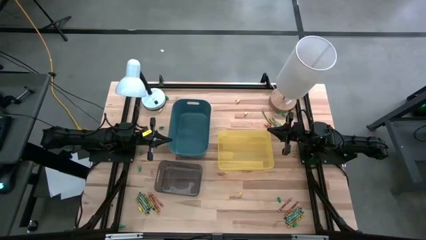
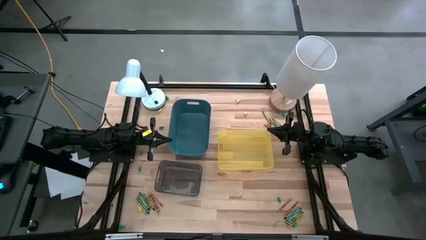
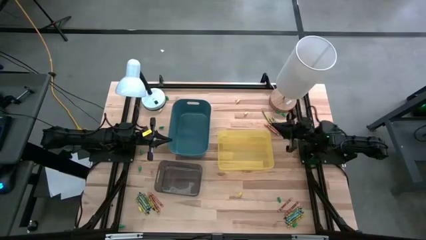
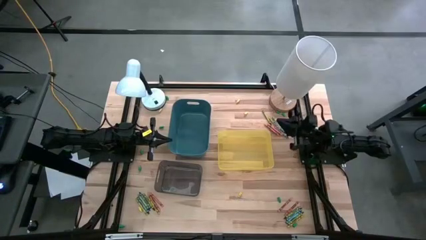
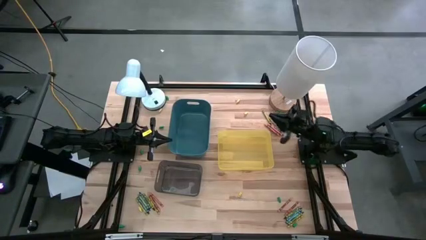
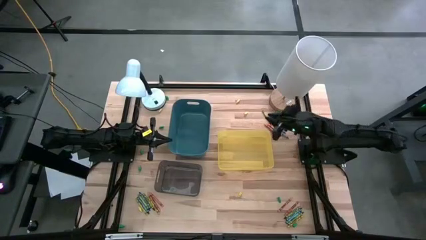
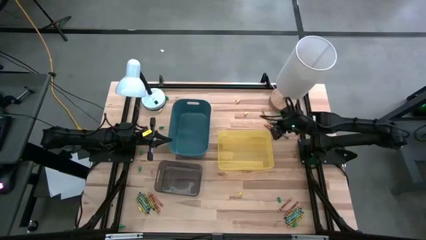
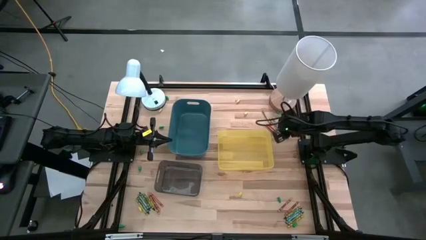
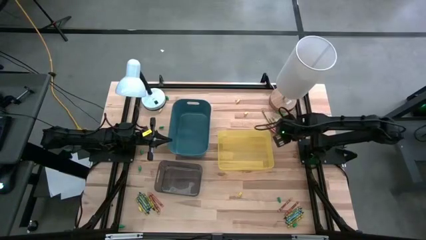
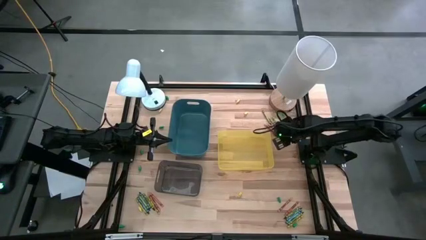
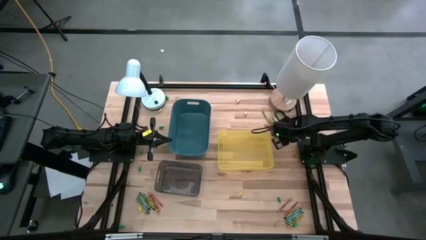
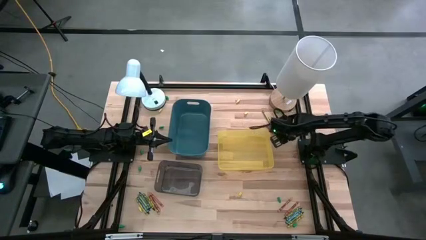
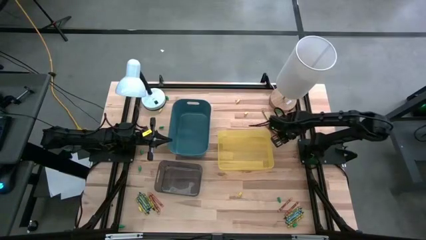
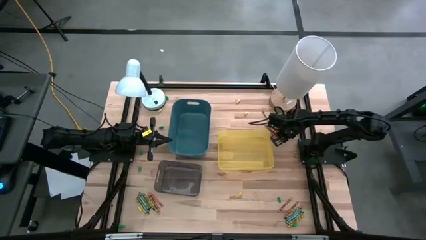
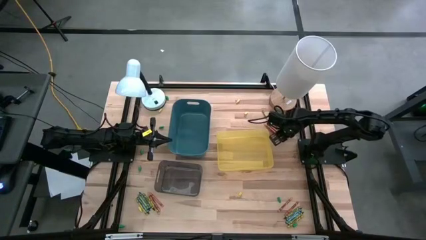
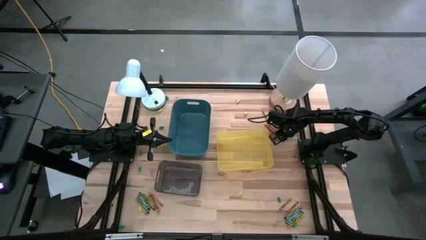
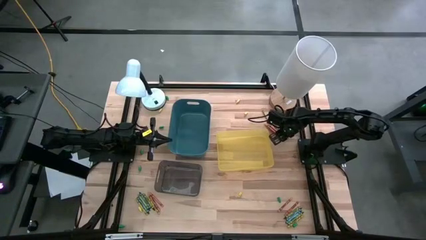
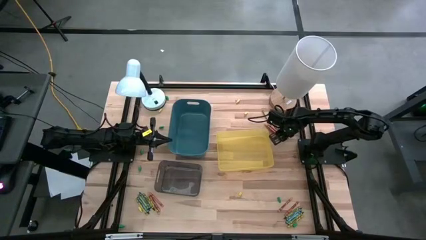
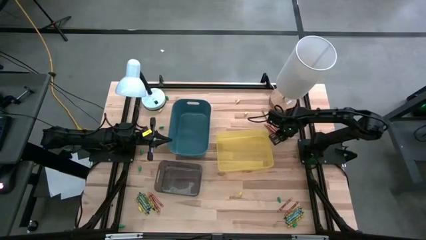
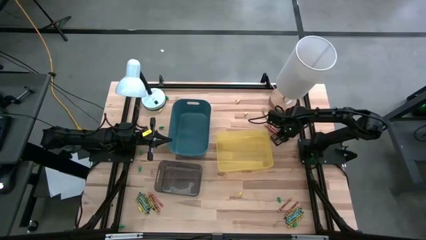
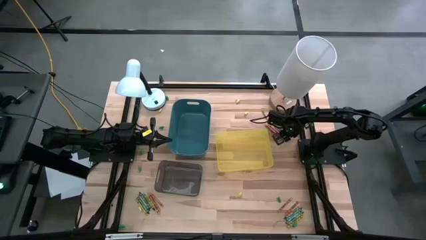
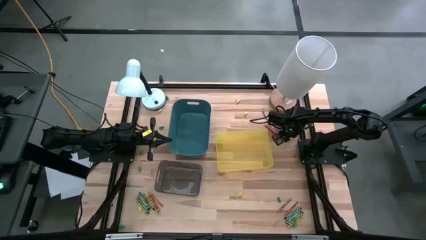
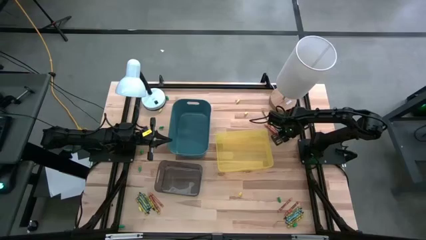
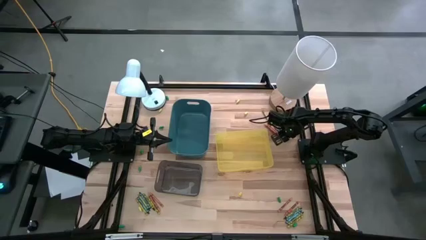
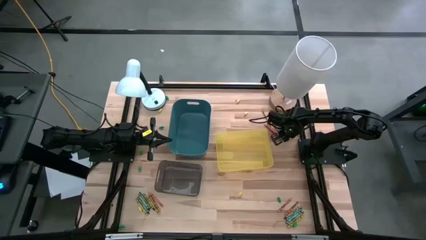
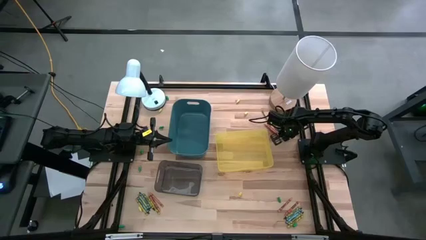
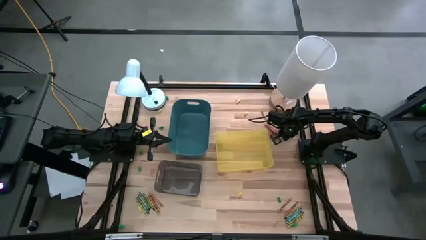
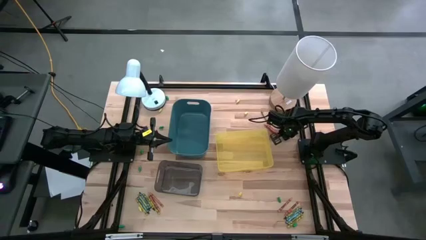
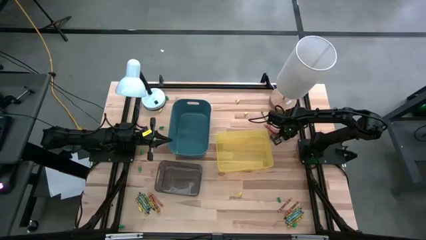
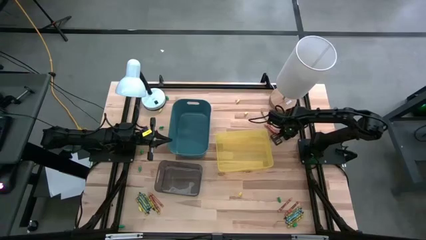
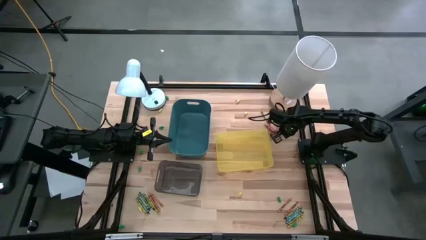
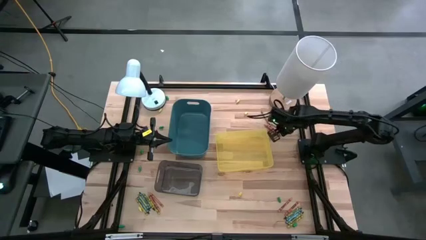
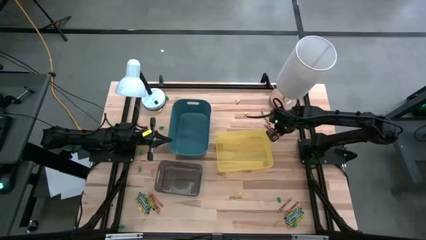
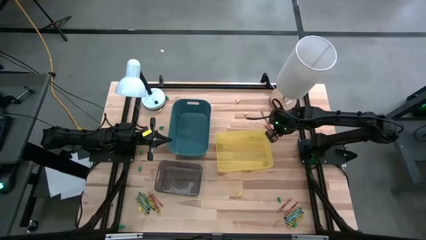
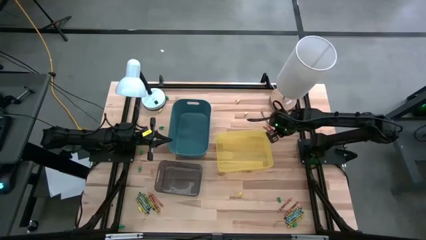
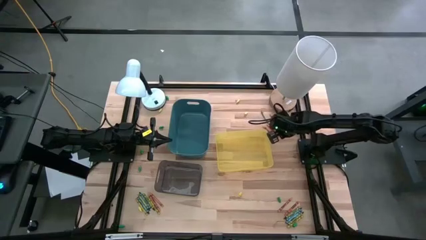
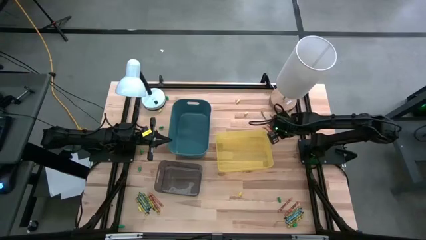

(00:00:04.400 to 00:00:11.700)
Task: Sort crayons
Put the blue crayon into the blue bin

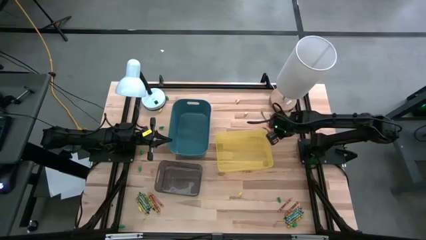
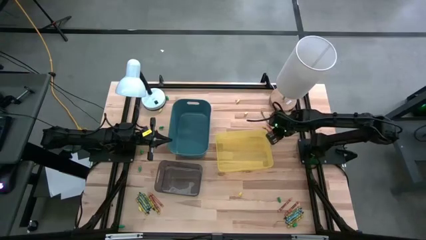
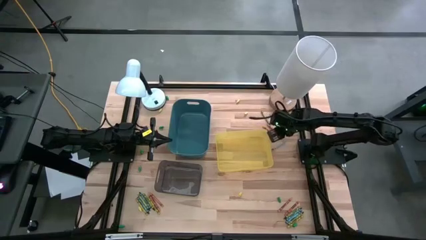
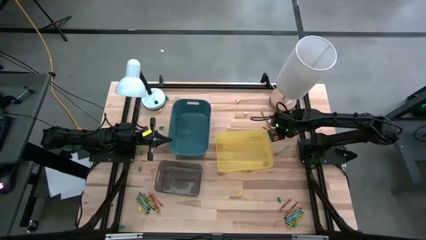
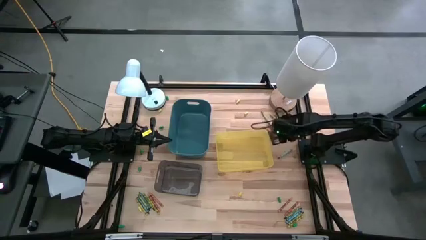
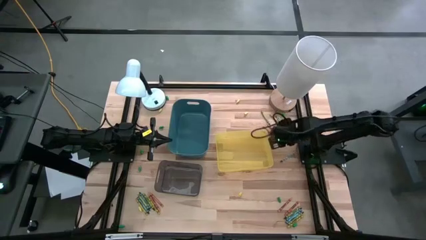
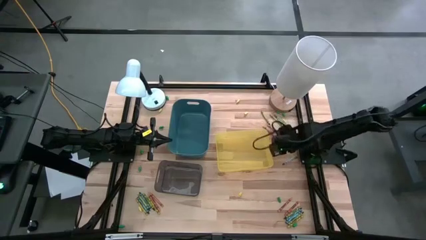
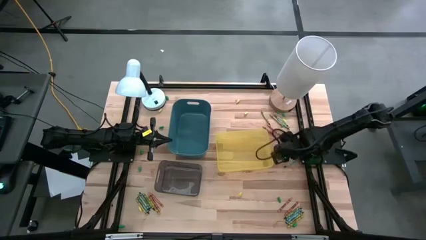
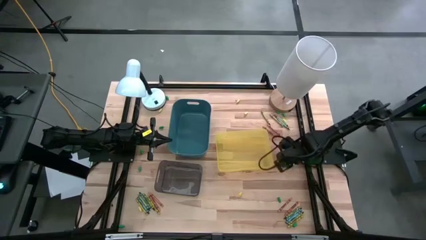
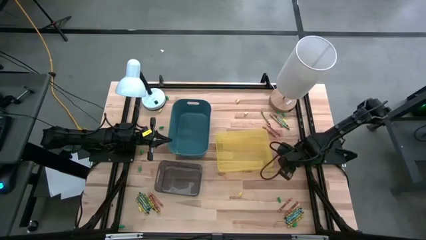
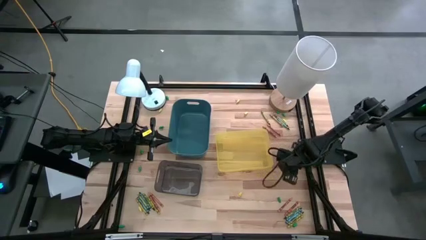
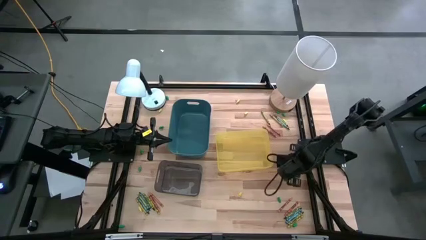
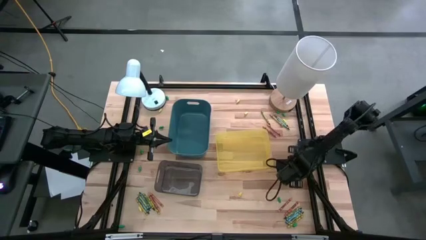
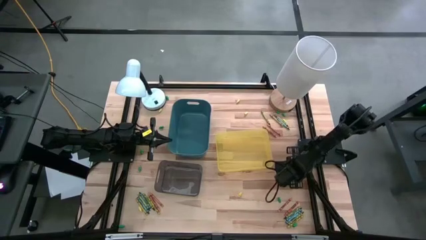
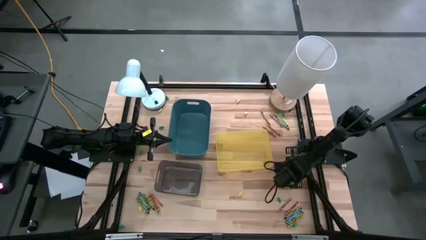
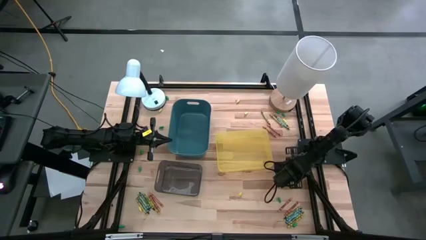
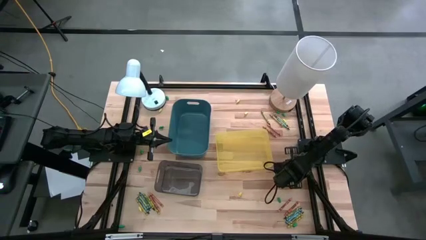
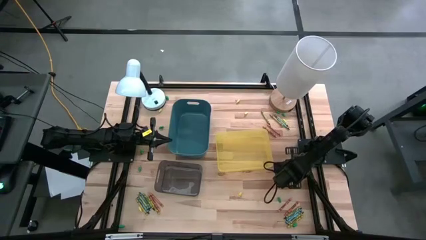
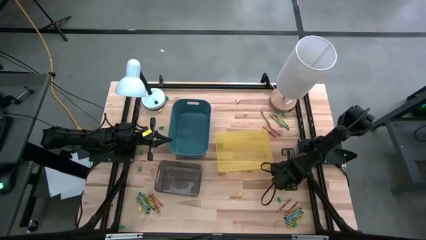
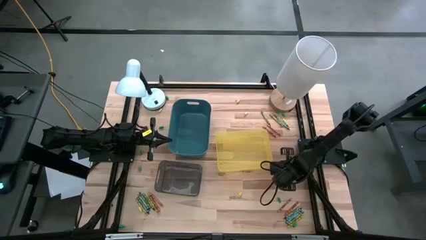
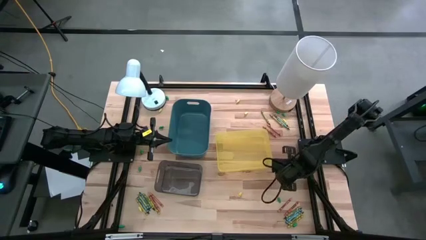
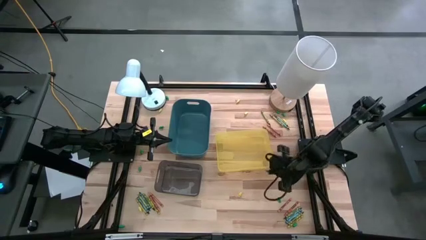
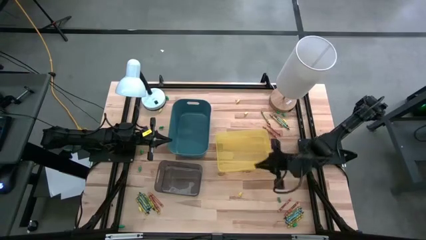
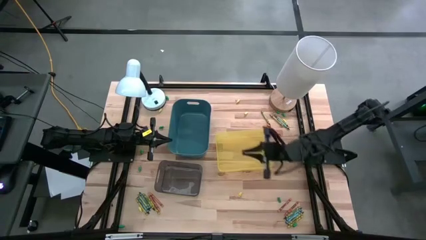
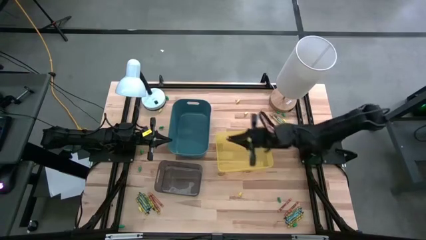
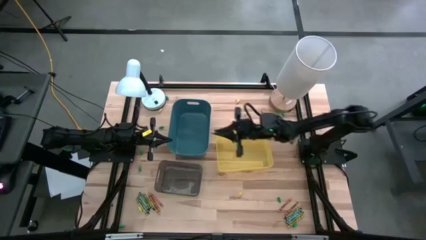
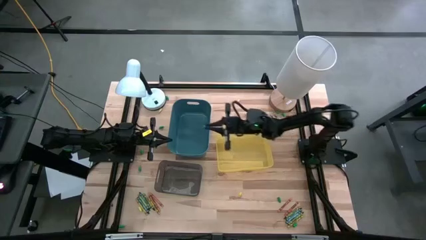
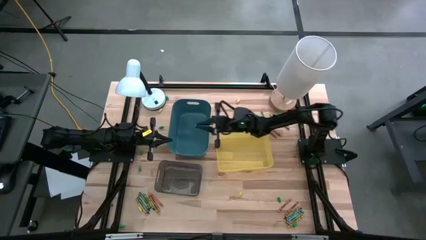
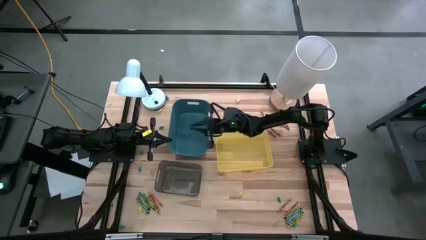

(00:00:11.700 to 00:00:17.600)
Put the blue crayon into the blue bin

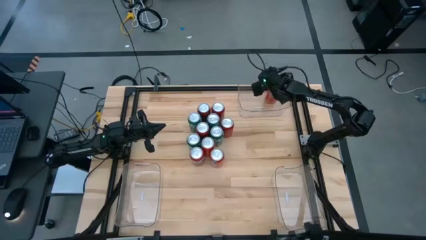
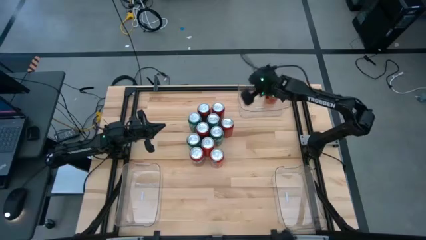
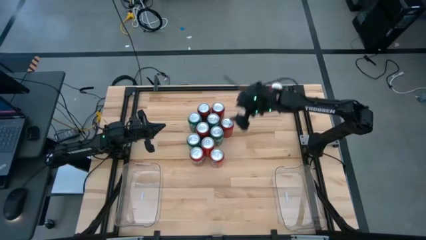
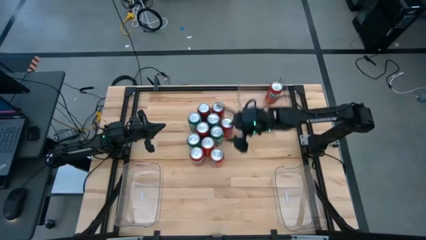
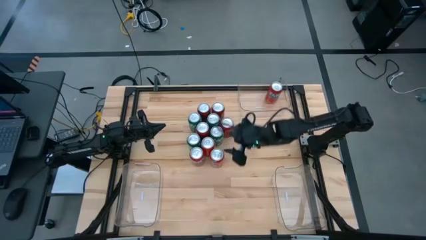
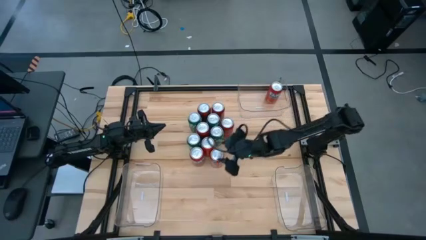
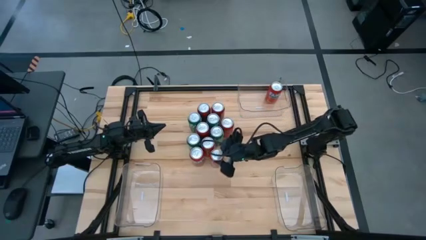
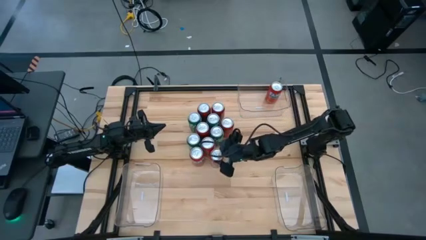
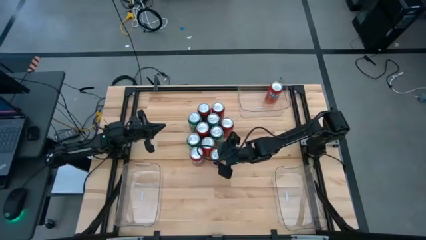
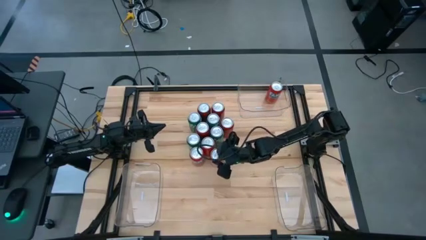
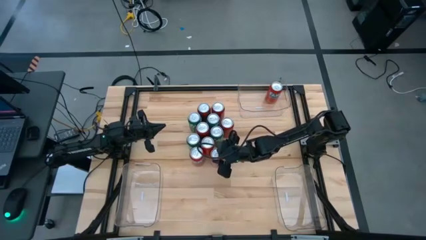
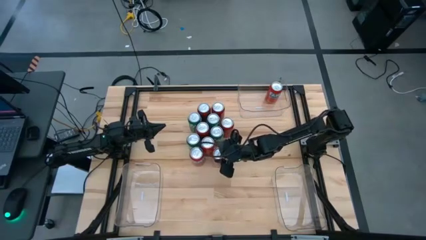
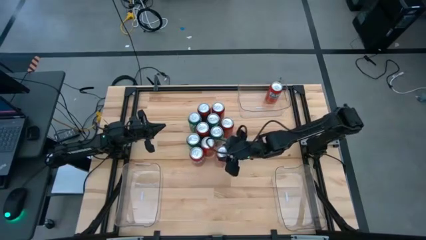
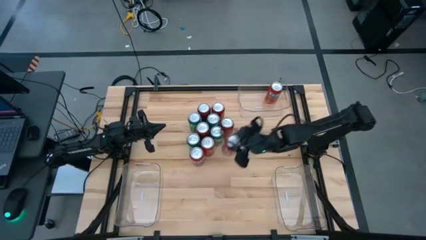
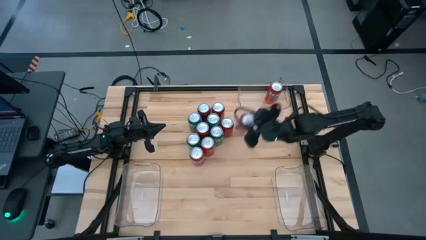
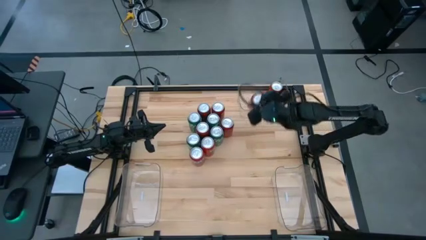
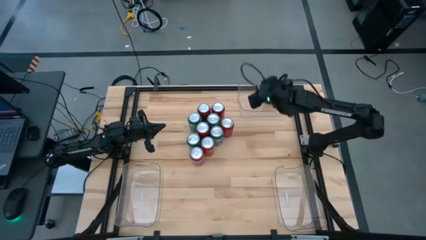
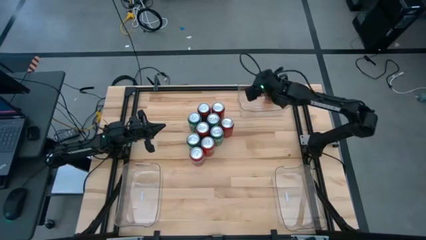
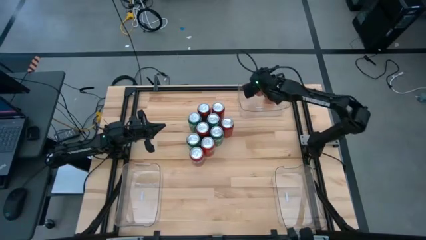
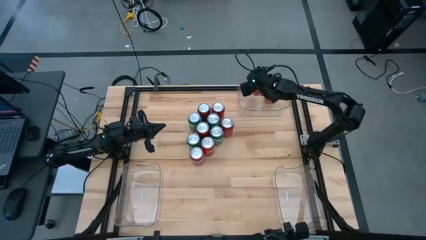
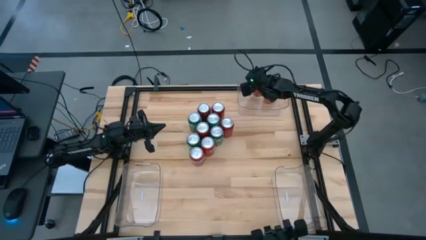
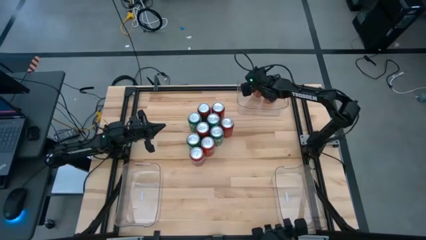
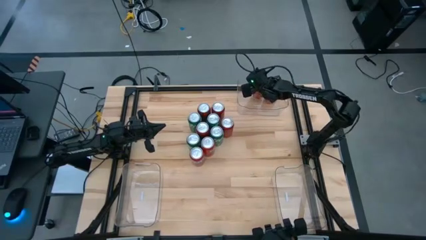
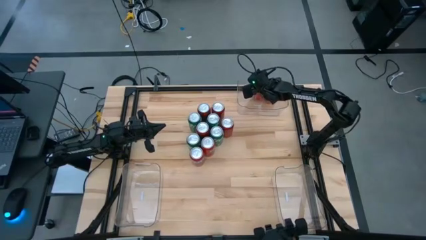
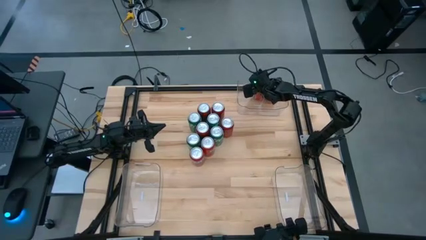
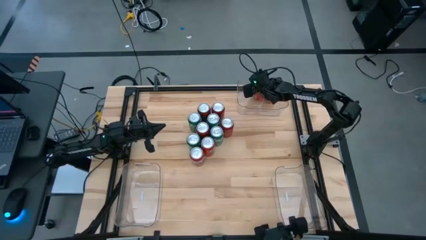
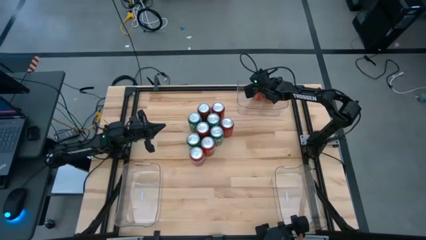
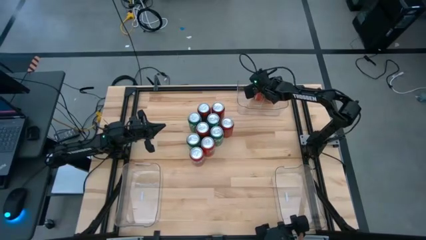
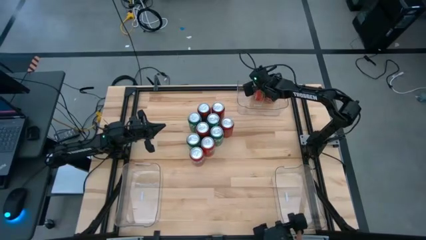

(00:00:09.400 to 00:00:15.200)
Task: Sort soda cans
Put the bottom left orange soda can into the top transparent bin
